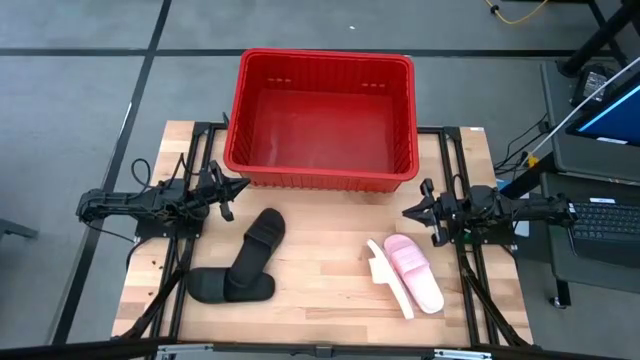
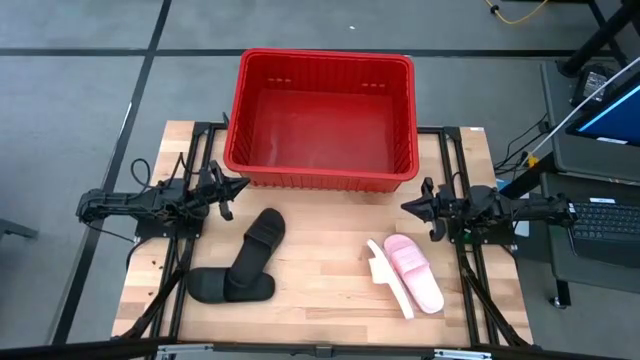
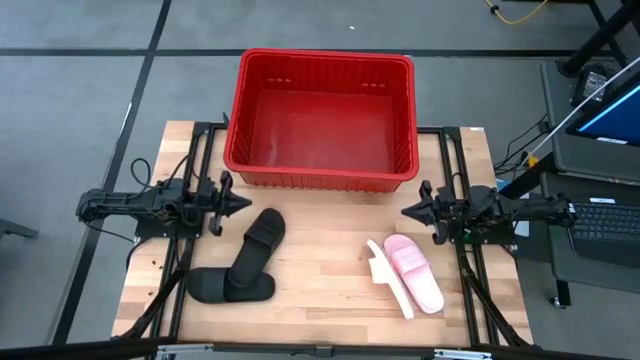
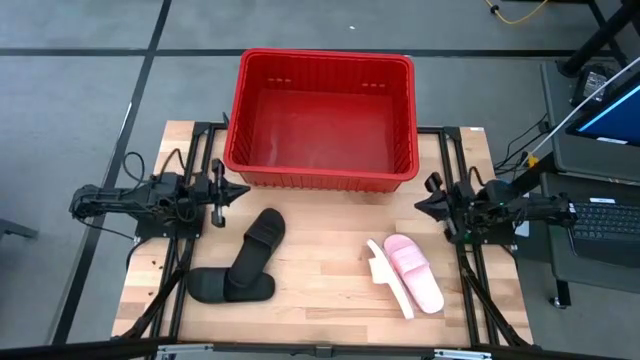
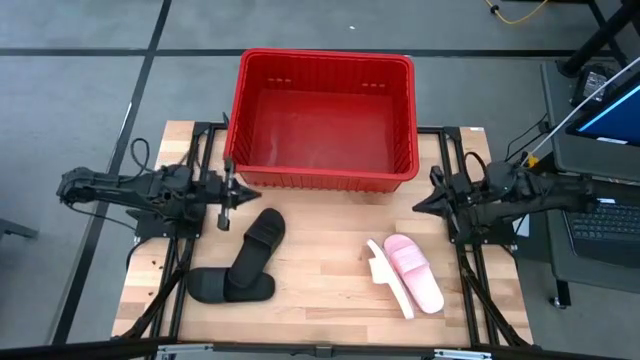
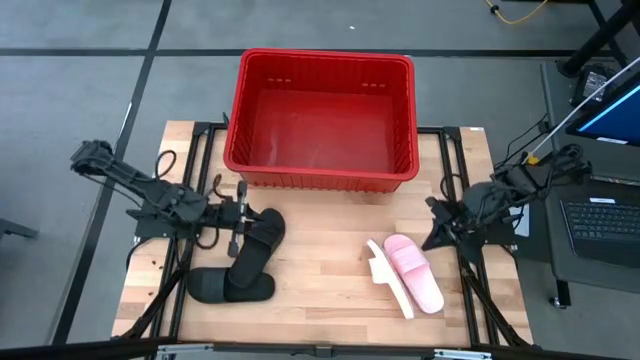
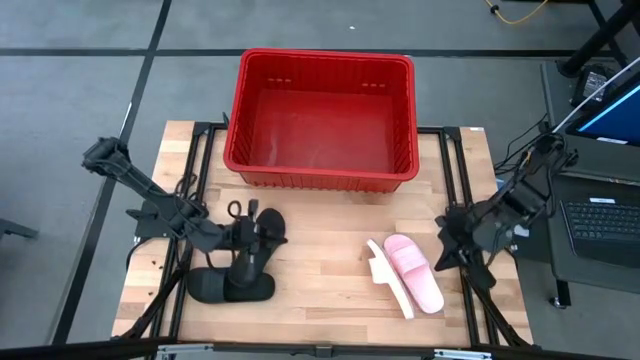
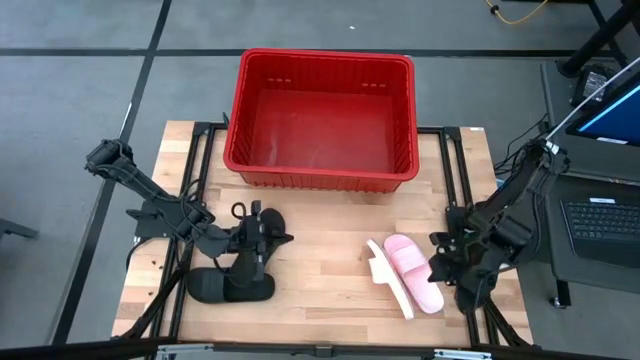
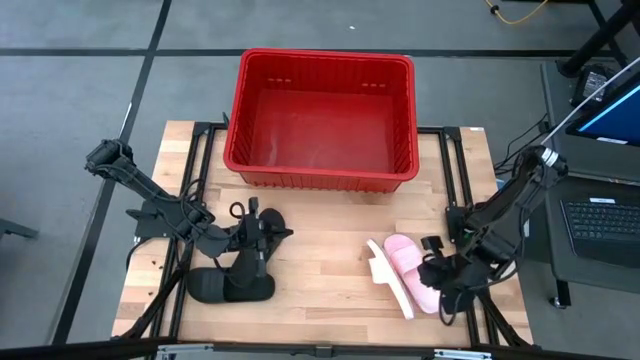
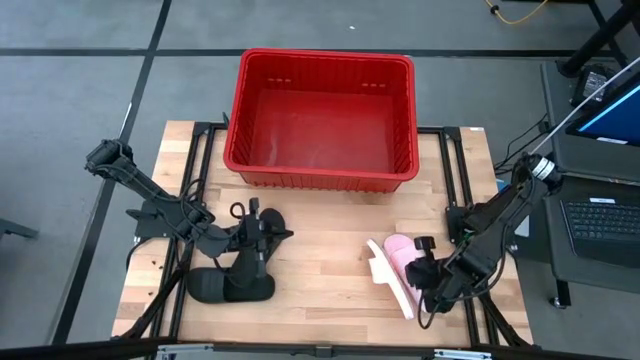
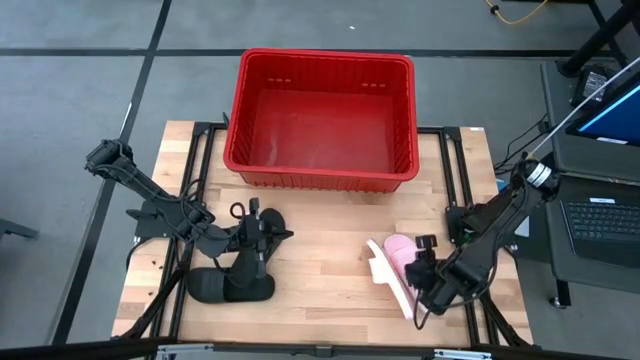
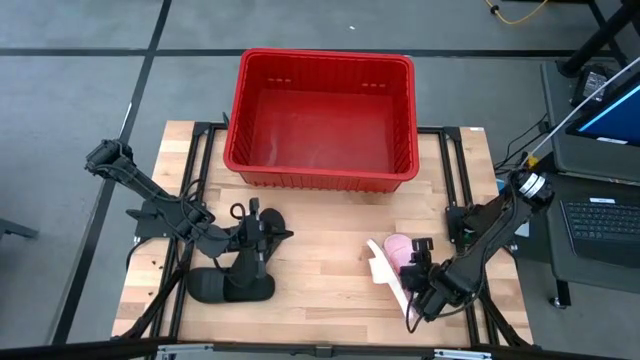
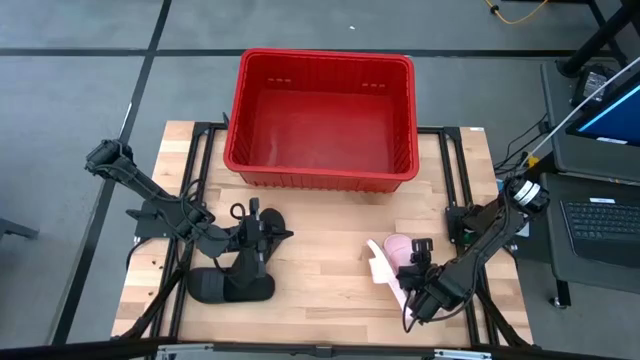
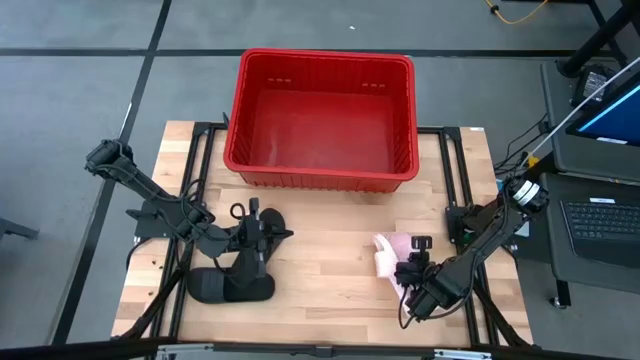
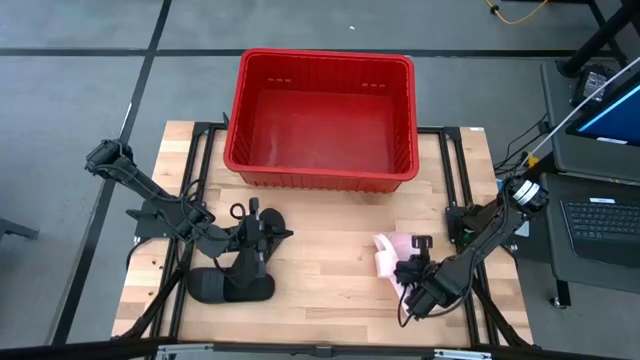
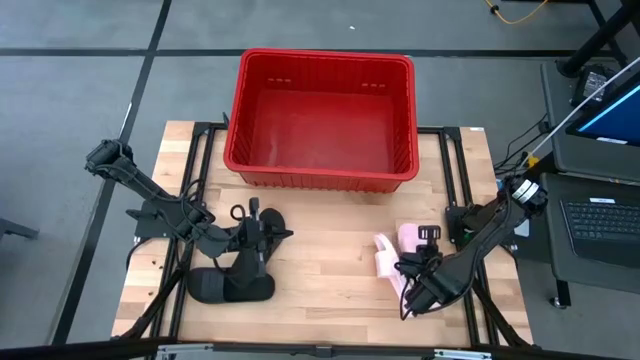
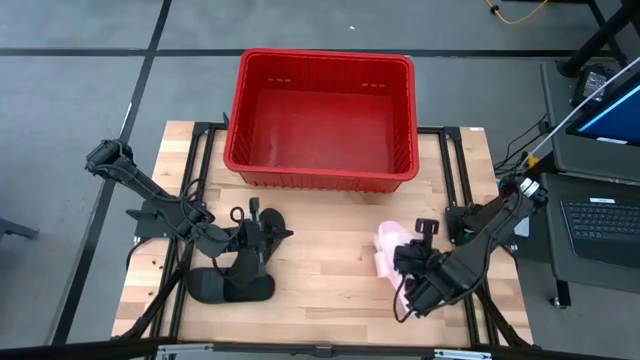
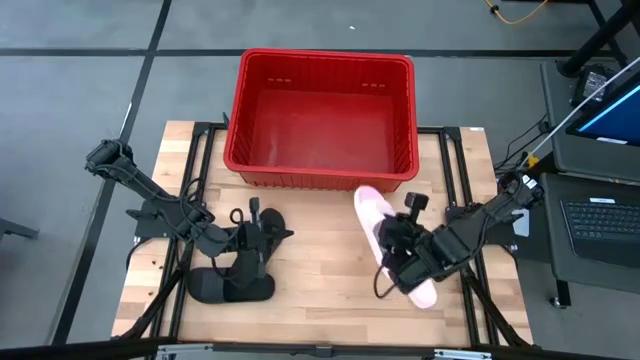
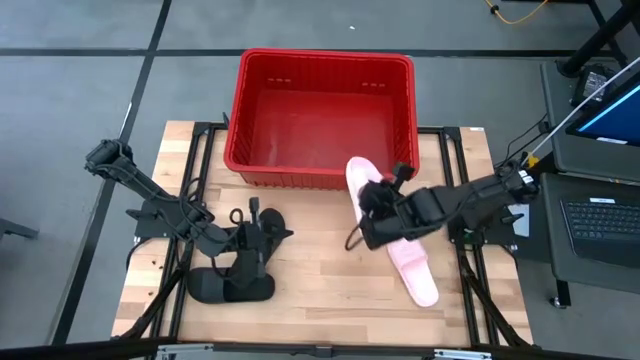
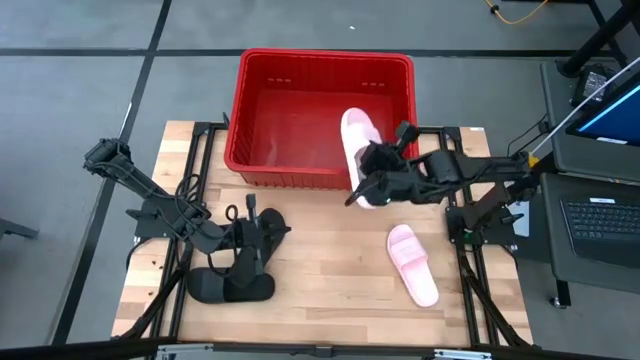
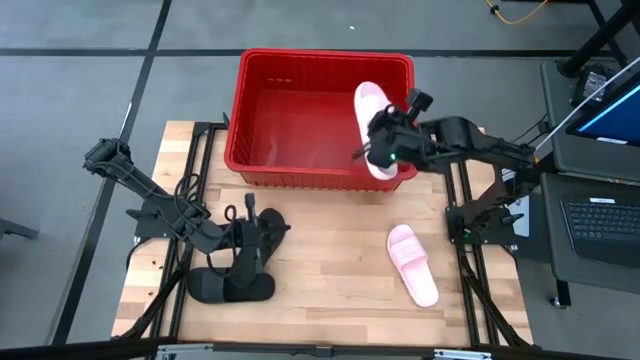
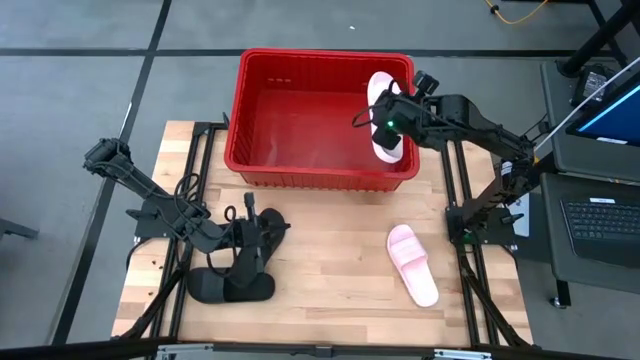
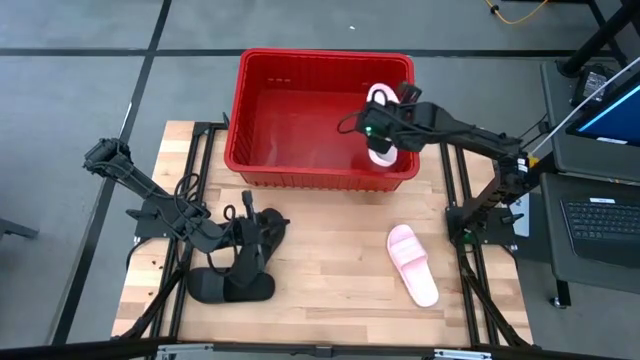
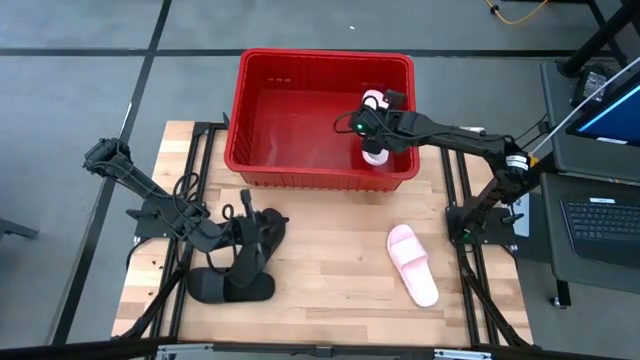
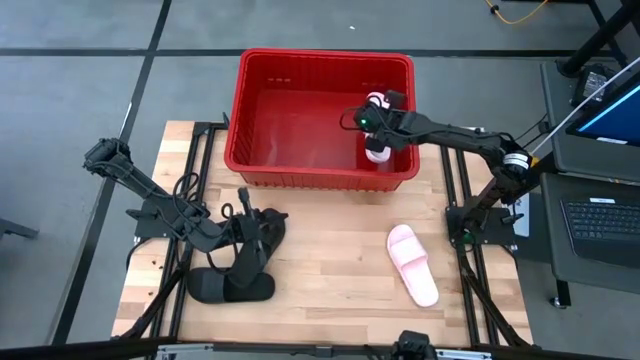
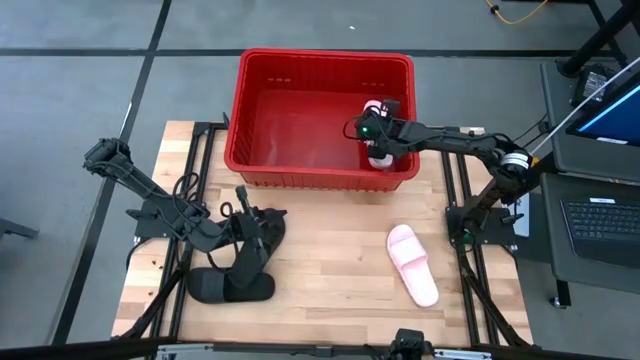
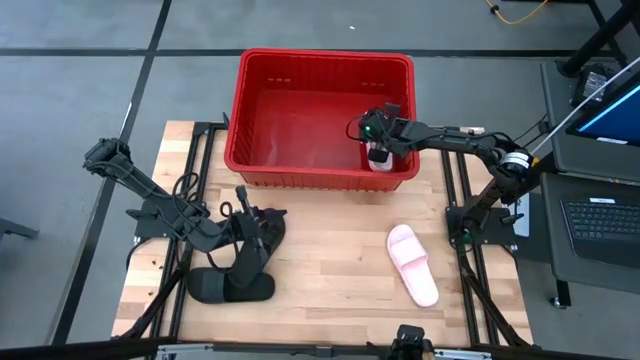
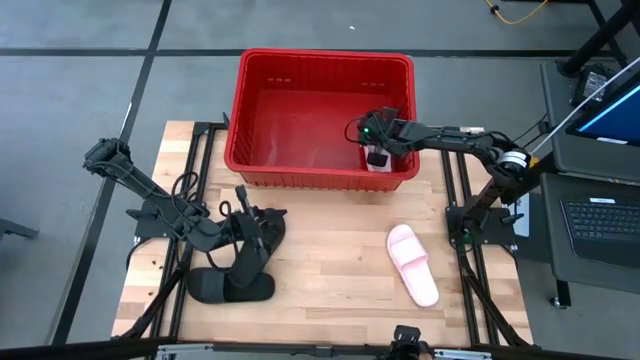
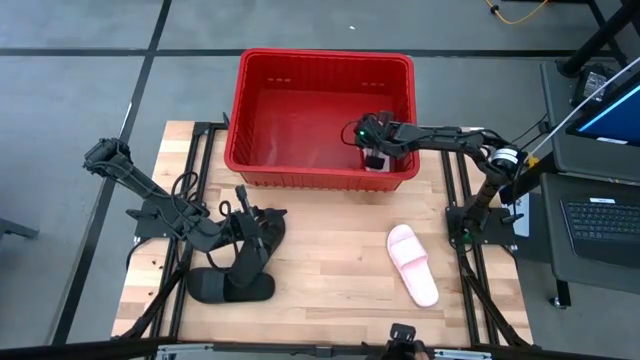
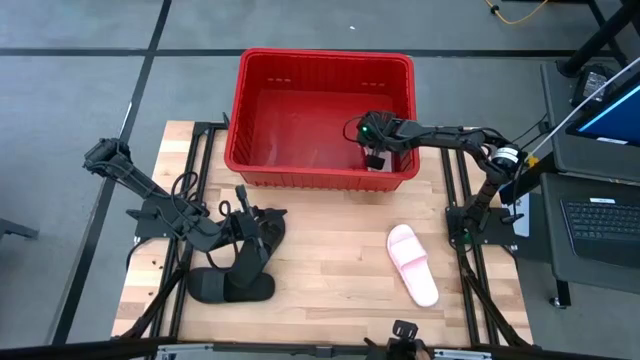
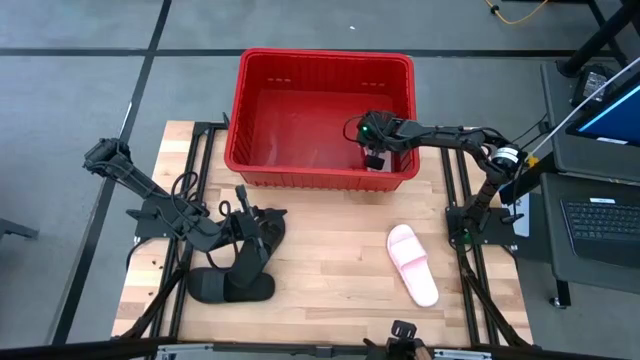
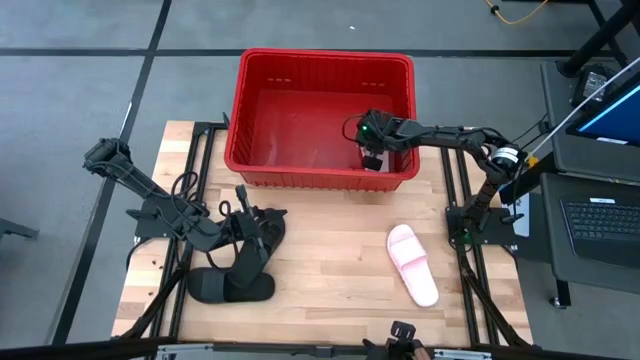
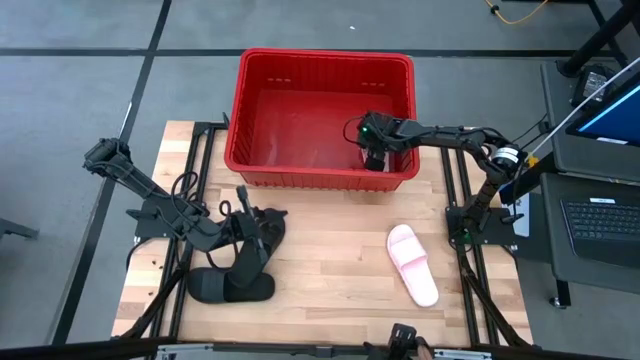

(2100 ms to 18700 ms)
Task: Pick and place slides into bin
Put the right pink slide into the red container

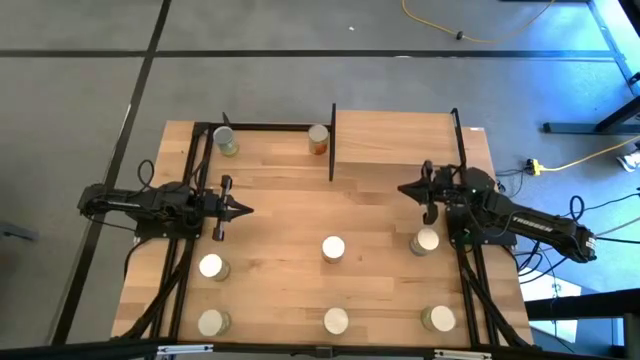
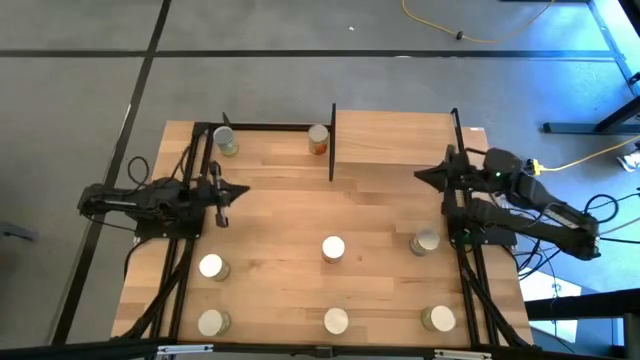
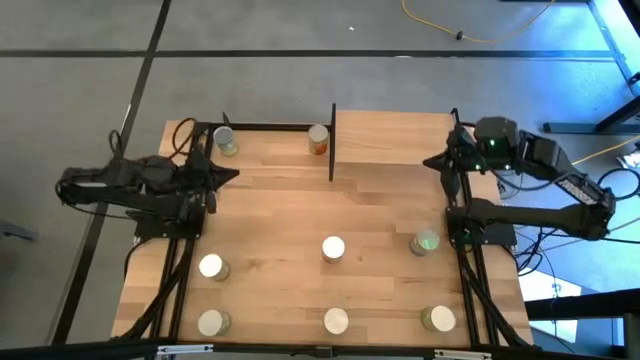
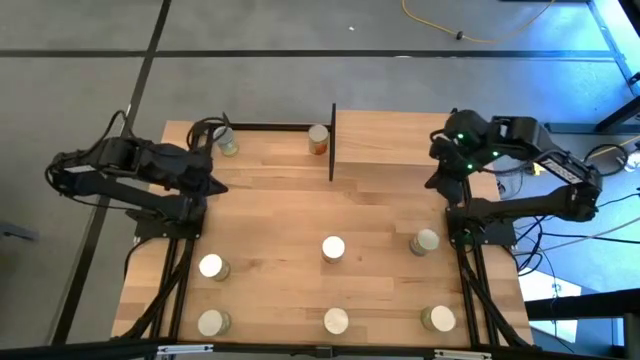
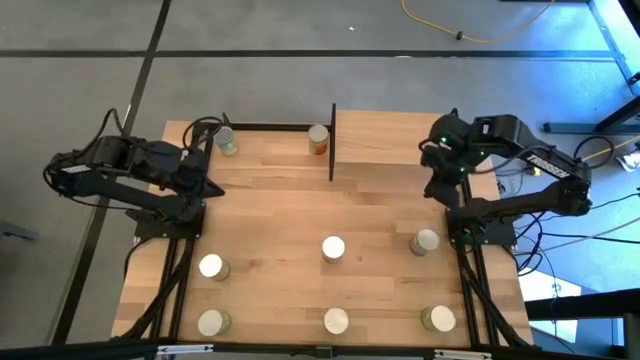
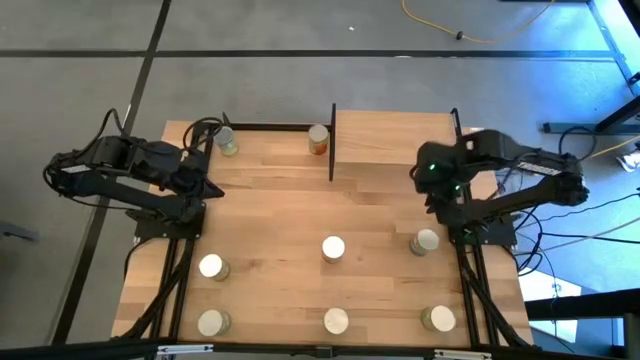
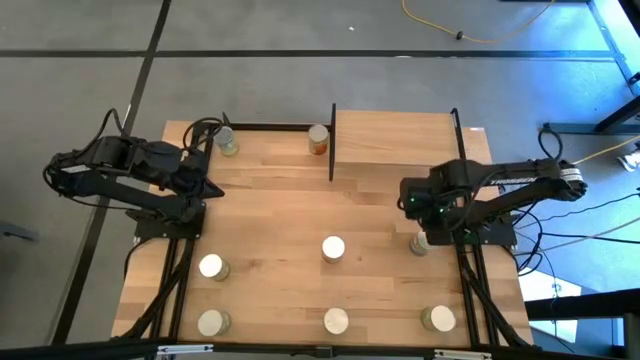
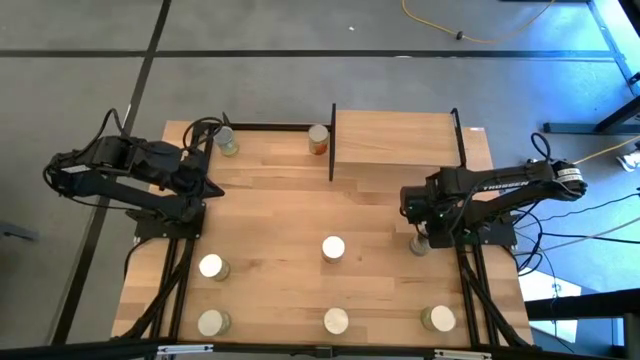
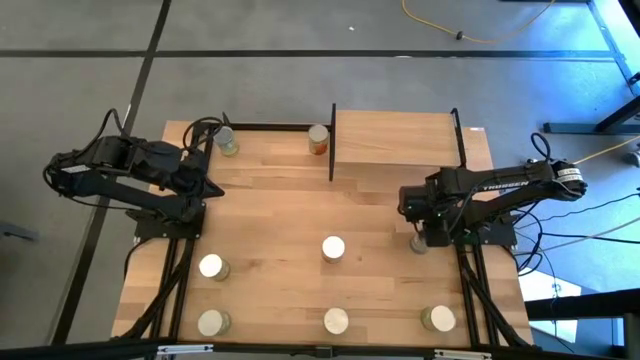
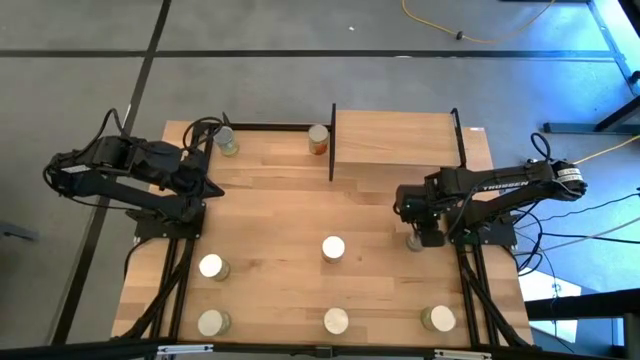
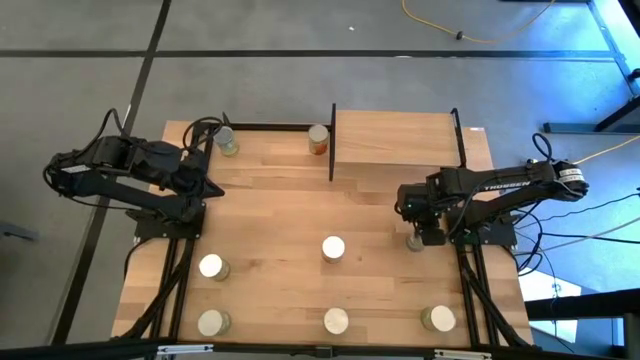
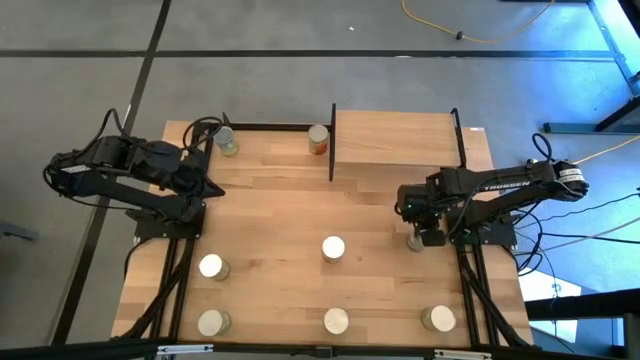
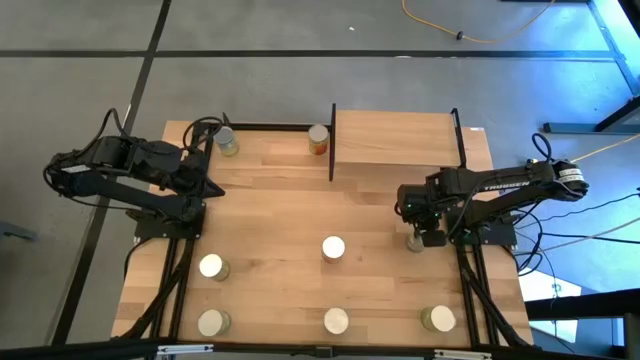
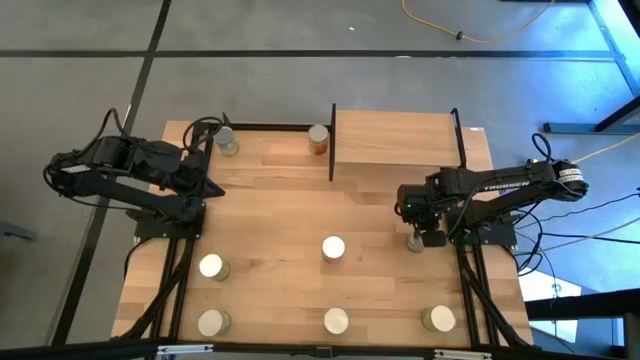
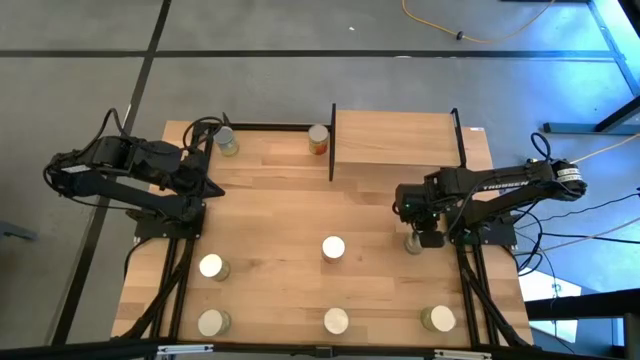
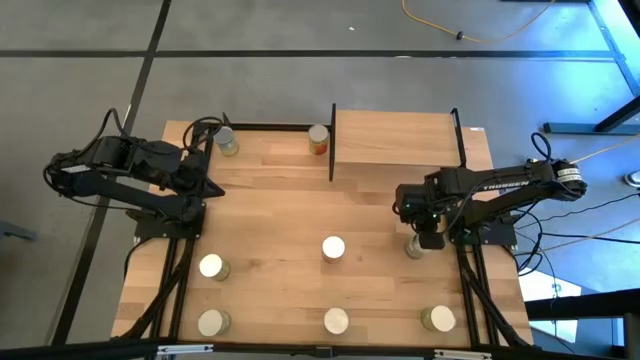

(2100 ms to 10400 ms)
Task: Pick and place cans onto a shelf
Put the canned peas on the shelf
